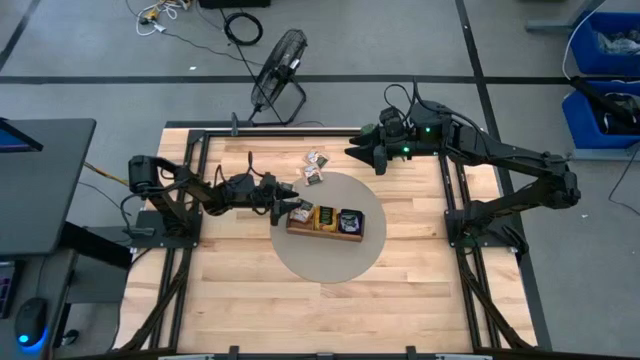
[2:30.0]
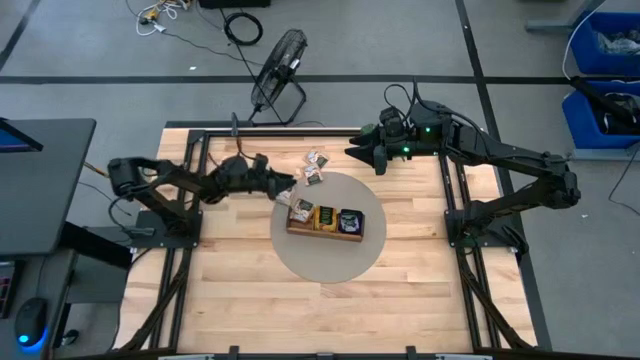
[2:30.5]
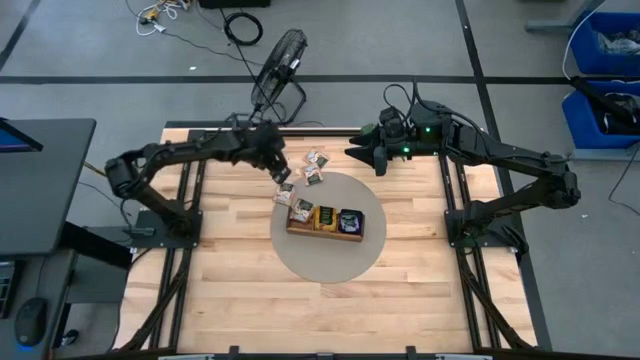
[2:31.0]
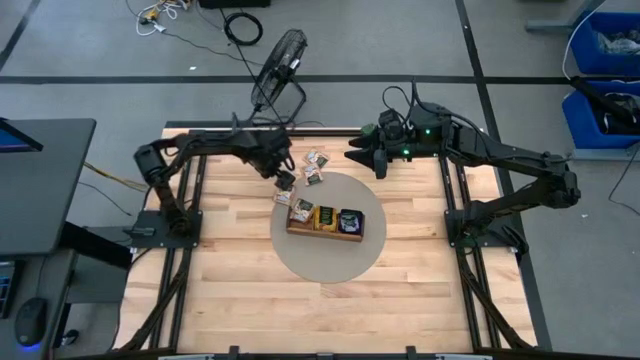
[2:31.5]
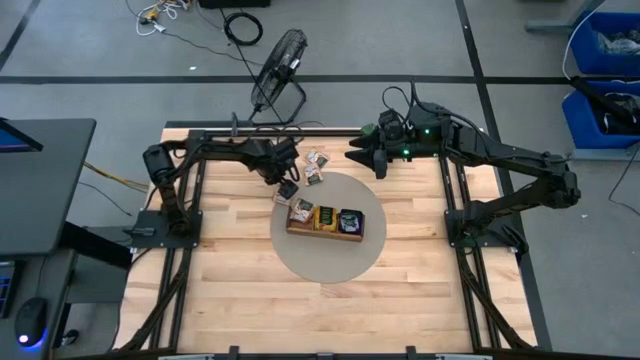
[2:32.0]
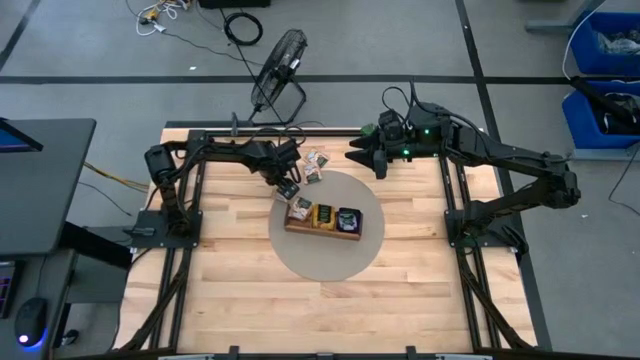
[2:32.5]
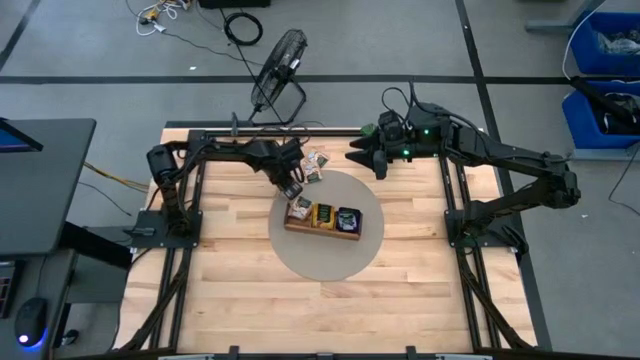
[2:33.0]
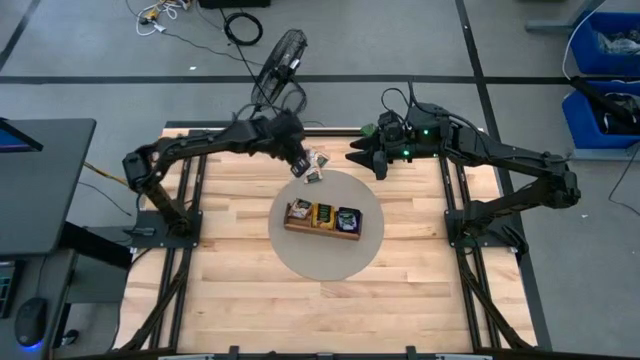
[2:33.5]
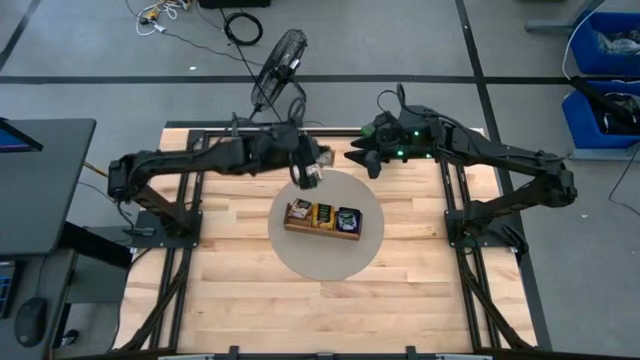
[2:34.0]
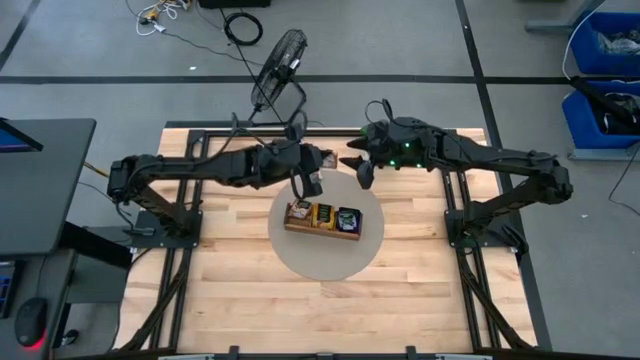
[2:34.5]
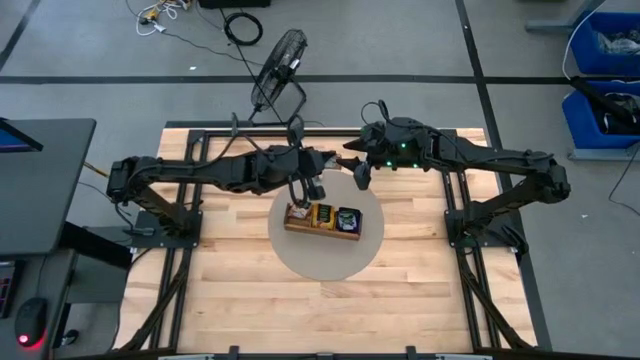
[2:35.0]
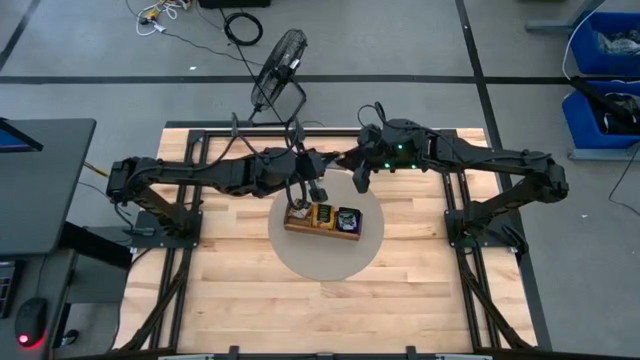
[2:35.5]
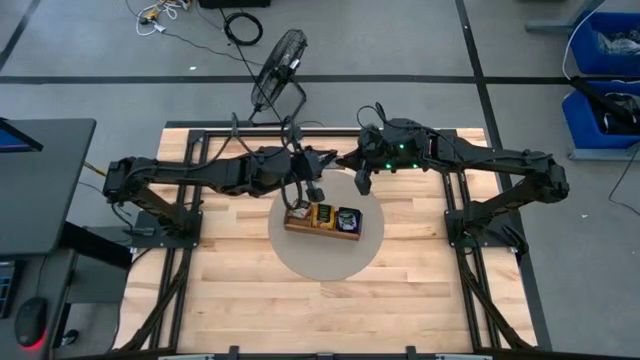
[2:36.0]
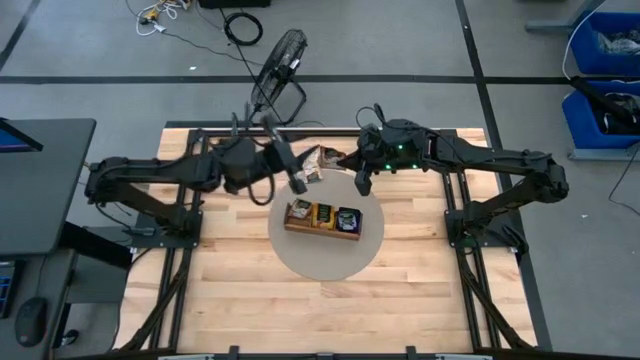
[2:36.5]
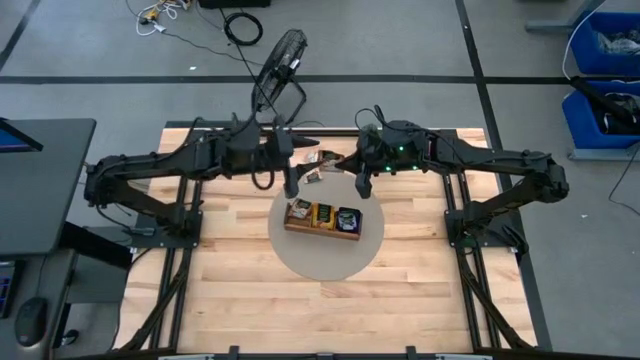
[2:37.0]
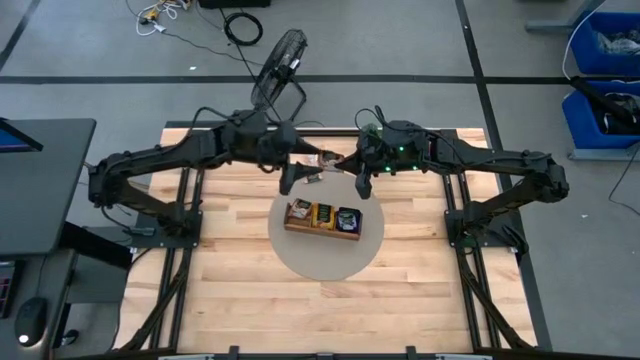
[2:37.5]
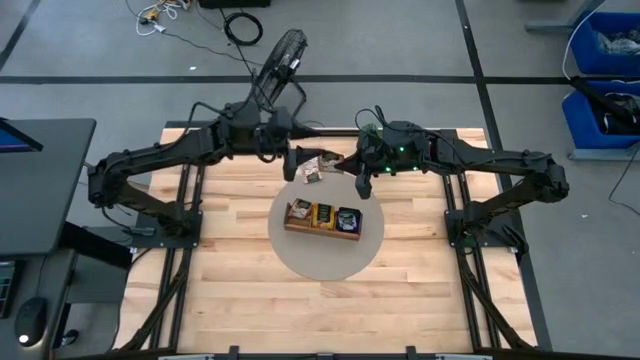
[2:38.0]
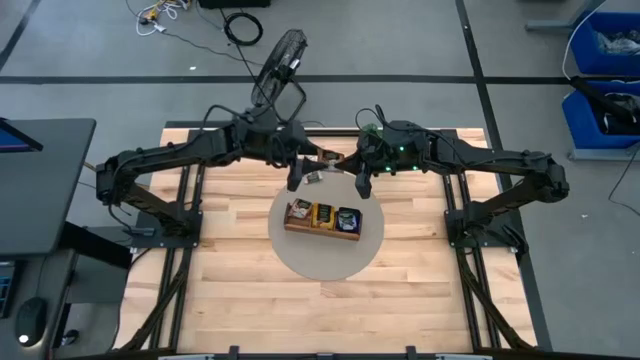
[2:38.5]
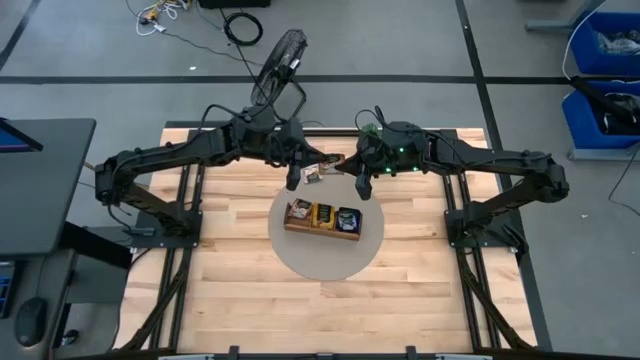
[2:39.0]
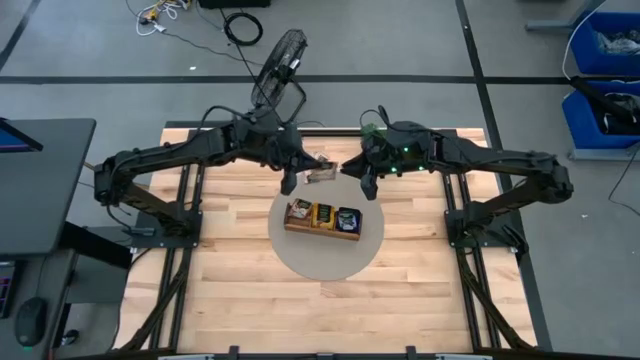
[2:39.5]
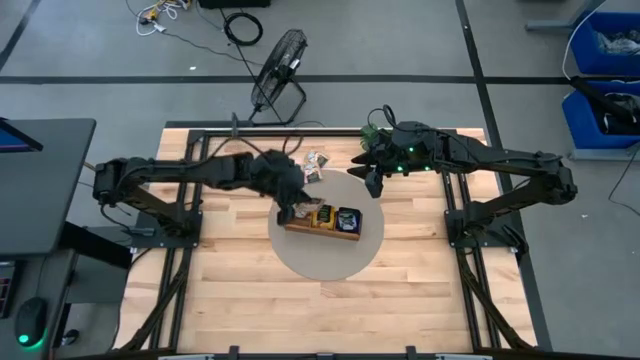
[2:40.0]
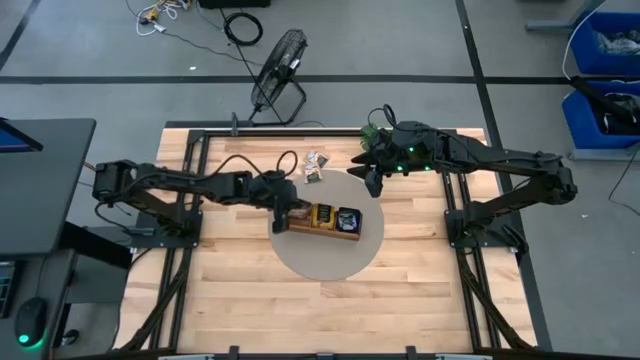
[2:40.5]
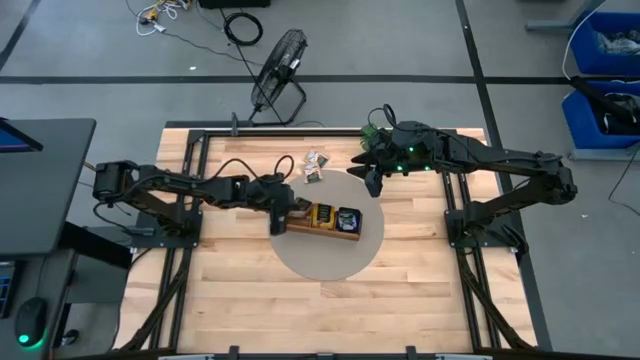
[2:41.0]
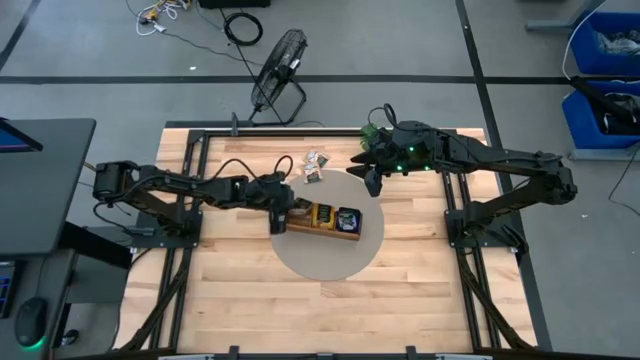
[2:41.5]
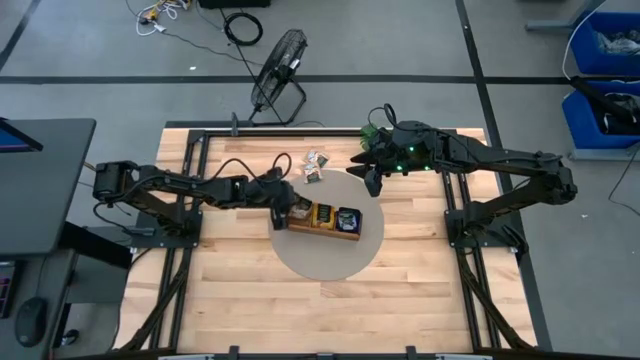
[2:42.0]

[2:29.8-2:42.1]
Task: Pick & Place Tea
Put the brown tea bag into the left section of the wooden organizer

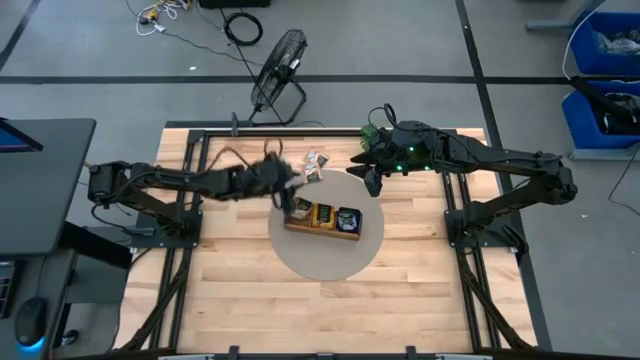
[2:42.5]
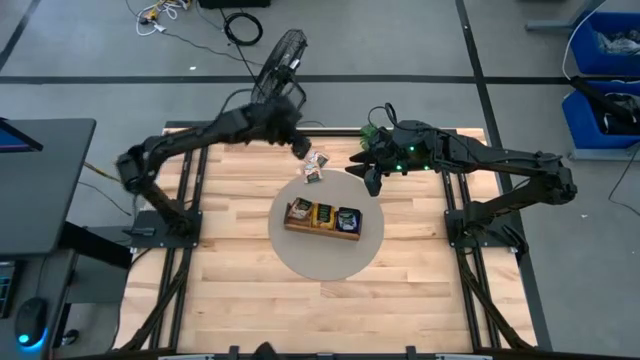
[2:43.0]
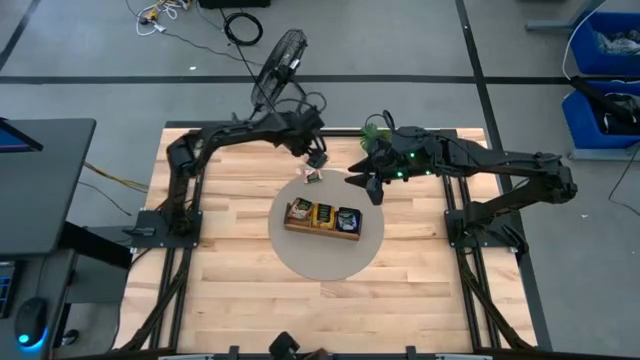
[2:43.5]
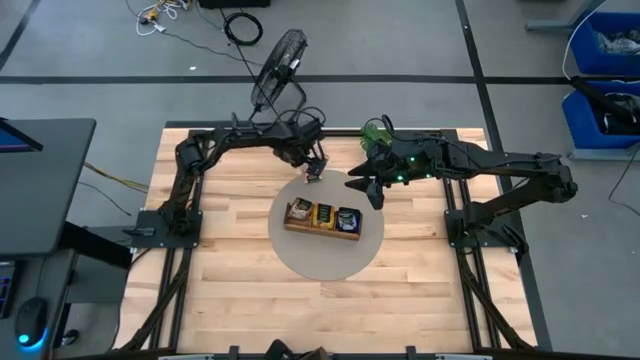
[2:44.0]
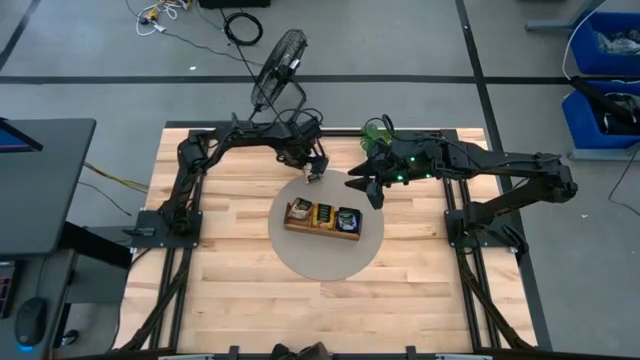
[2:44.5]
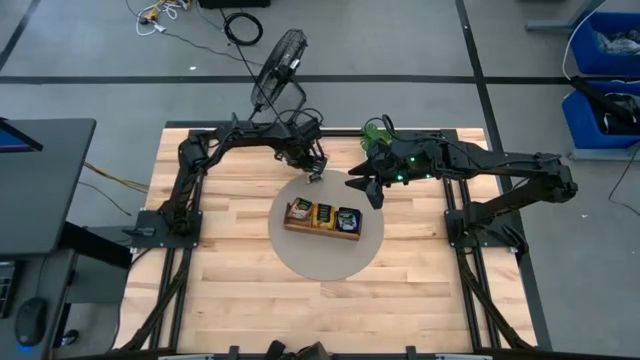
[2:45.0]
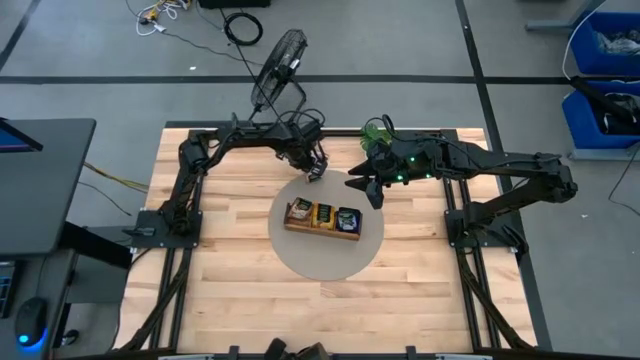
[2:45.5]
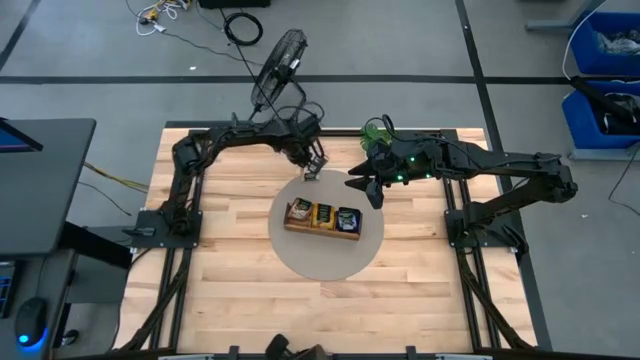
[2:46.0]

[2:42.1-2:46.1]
Put the brown tea bag into the left section of the wooden organizer

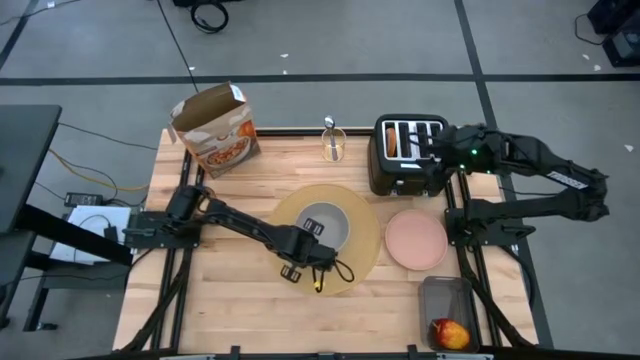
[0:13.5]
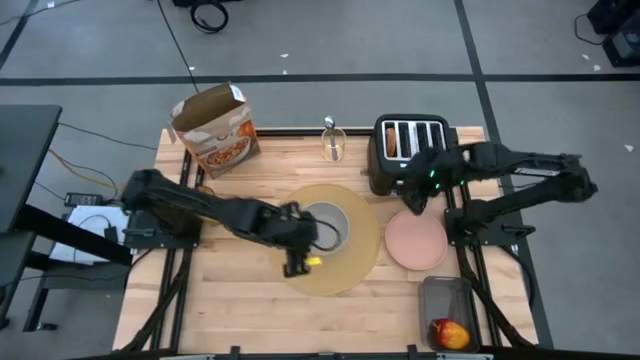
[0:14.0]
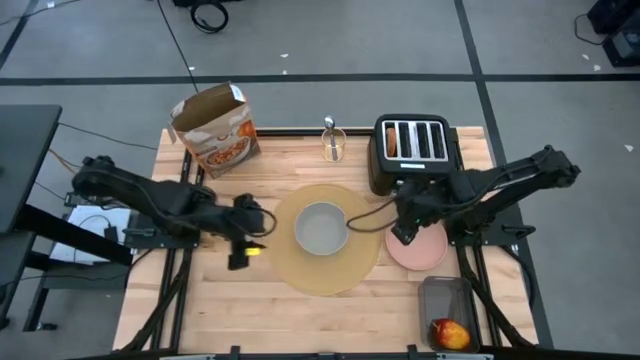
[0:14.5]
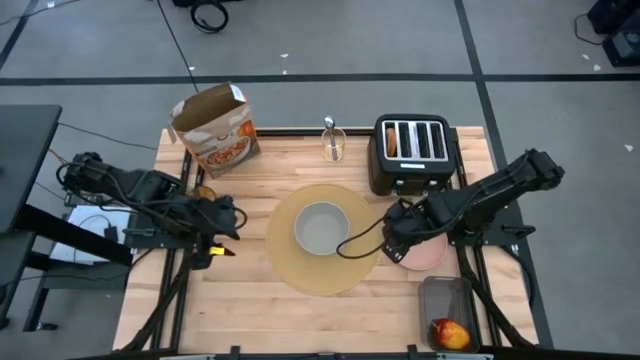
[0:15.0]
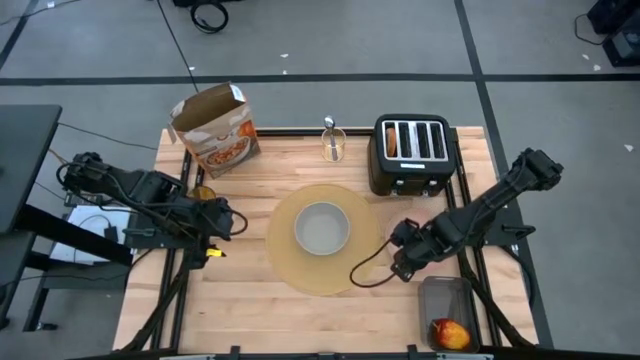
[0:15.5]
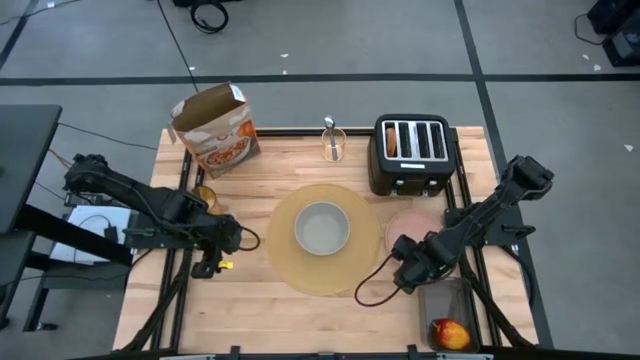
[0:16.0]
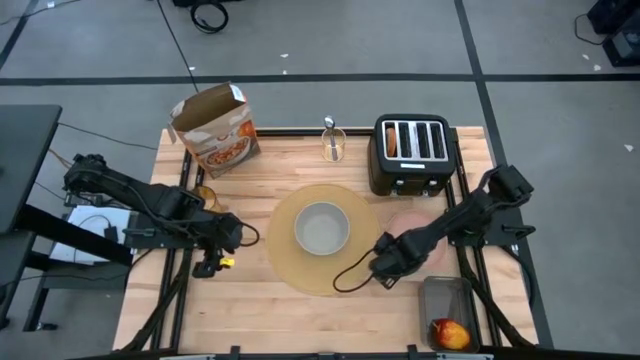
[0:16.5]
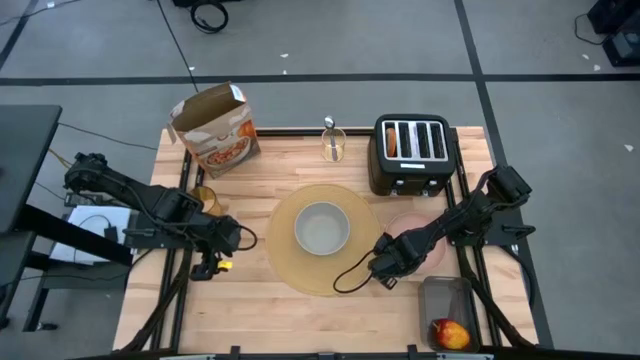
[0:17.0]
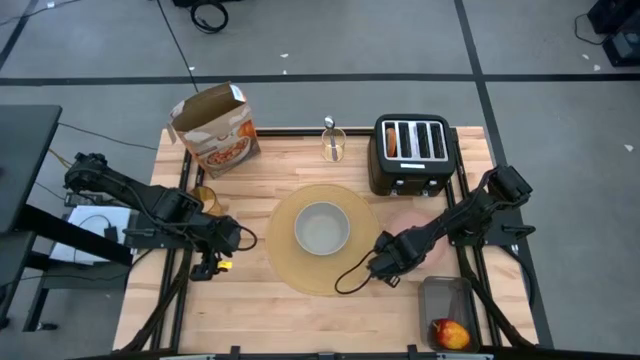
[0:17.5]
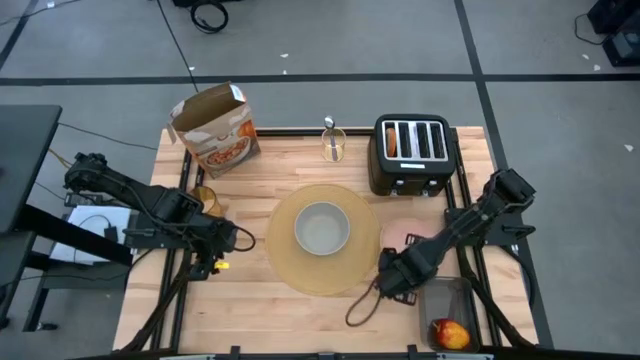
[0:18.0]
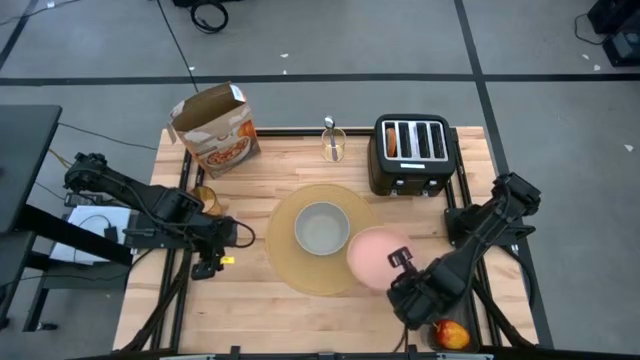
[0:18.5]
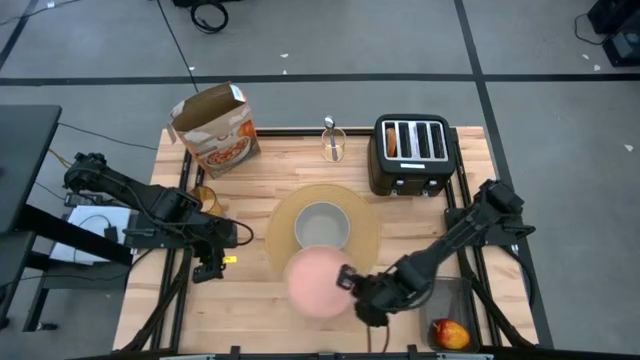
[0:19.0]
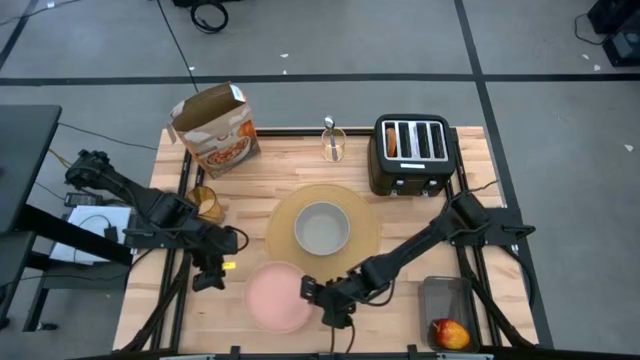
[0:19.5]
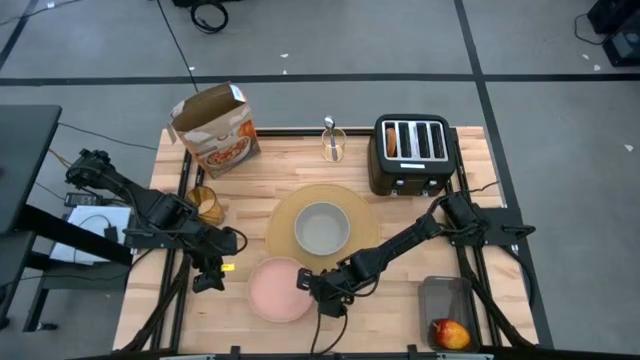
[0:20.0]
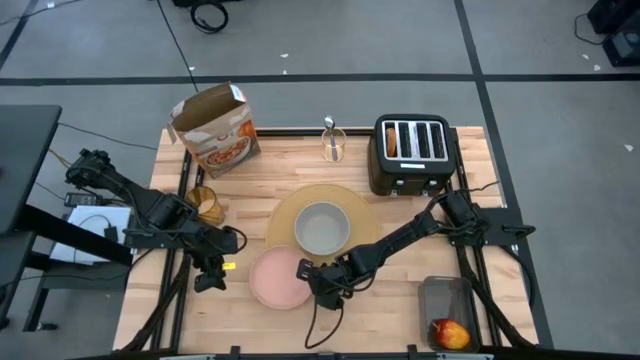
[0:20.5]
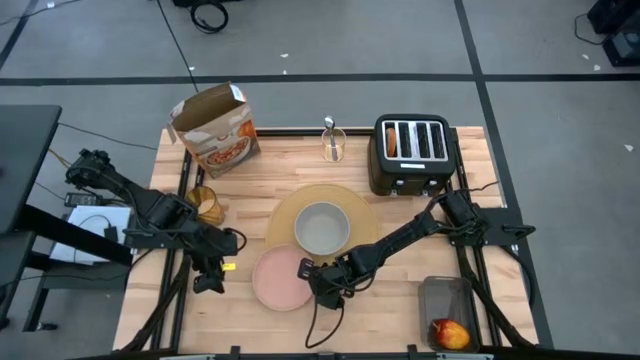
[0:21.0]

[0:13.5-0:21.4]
Task: Arrange a breakfast setting
Put the pink plate on the bottom left of the gray bowl
